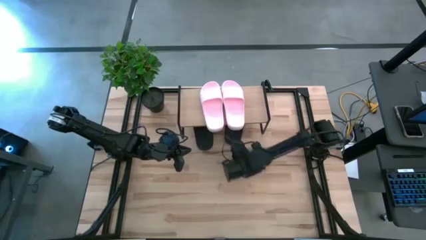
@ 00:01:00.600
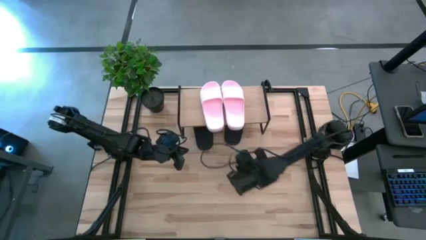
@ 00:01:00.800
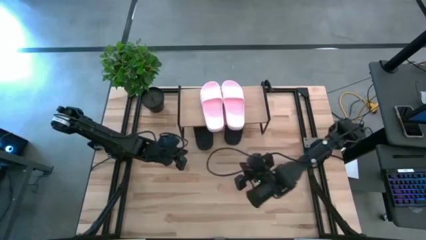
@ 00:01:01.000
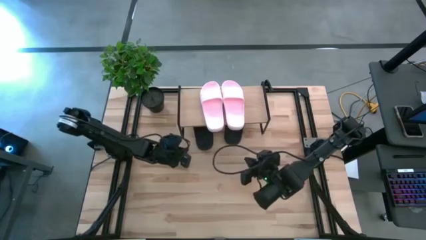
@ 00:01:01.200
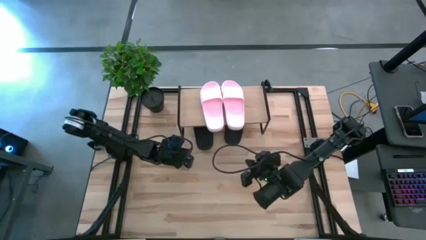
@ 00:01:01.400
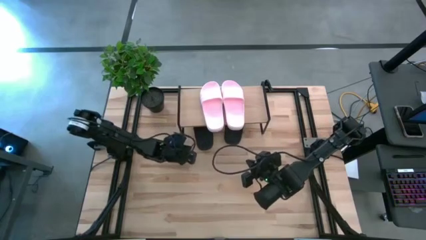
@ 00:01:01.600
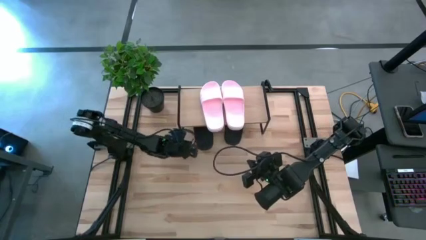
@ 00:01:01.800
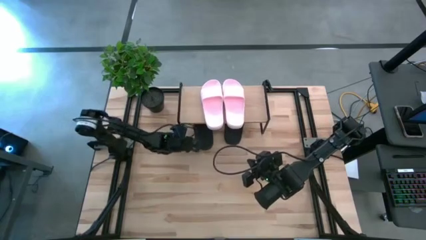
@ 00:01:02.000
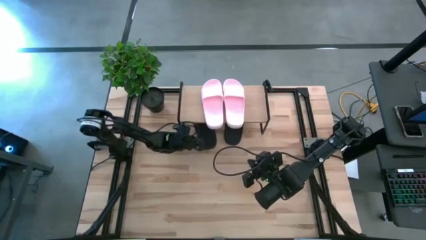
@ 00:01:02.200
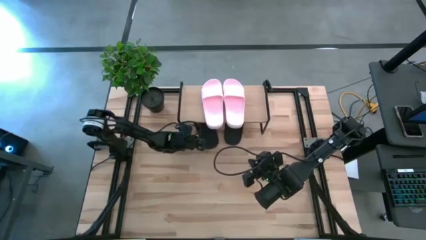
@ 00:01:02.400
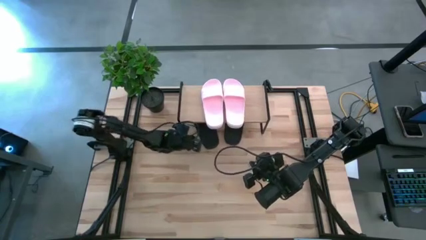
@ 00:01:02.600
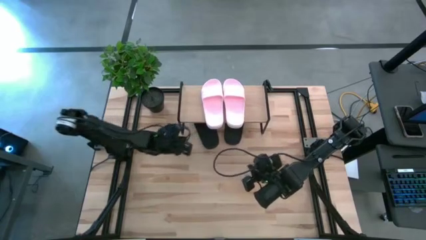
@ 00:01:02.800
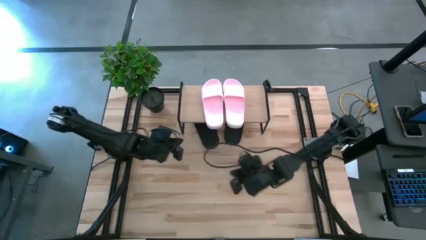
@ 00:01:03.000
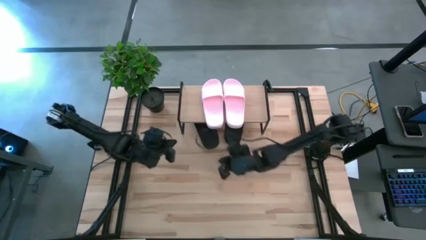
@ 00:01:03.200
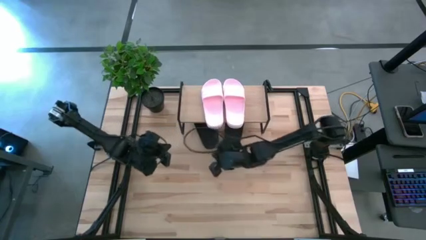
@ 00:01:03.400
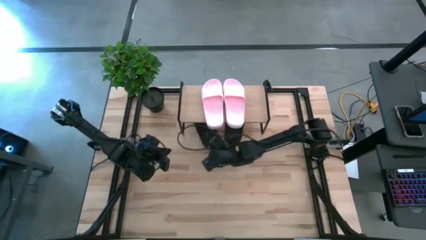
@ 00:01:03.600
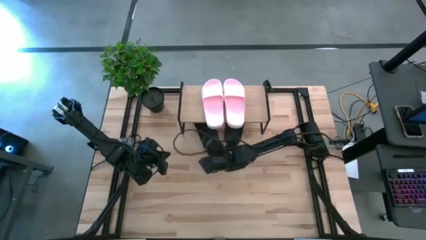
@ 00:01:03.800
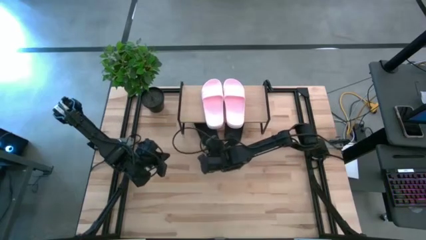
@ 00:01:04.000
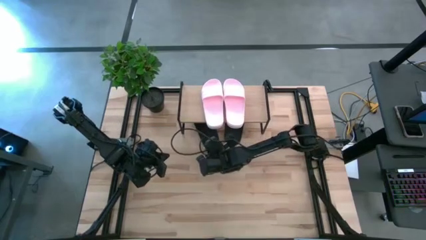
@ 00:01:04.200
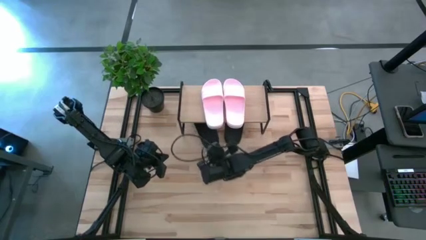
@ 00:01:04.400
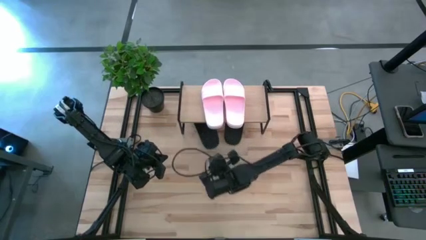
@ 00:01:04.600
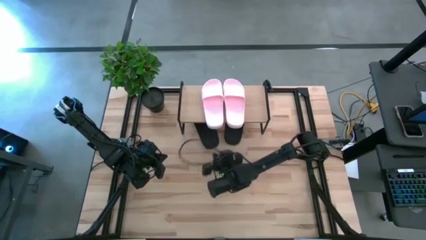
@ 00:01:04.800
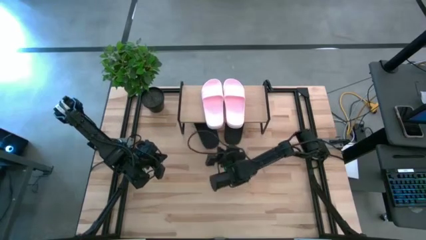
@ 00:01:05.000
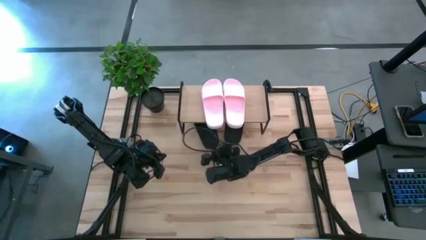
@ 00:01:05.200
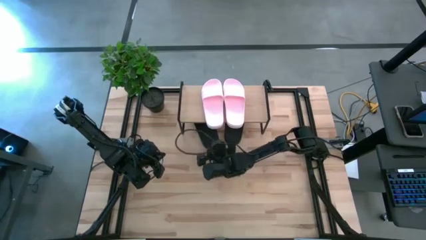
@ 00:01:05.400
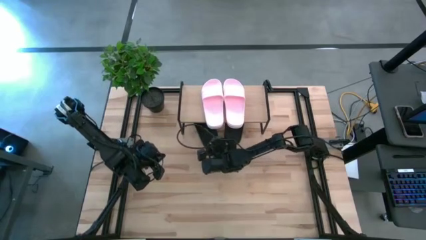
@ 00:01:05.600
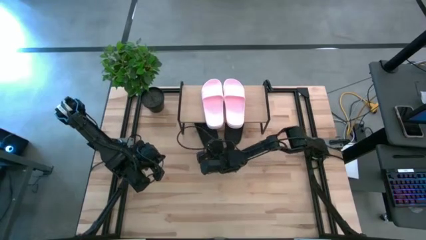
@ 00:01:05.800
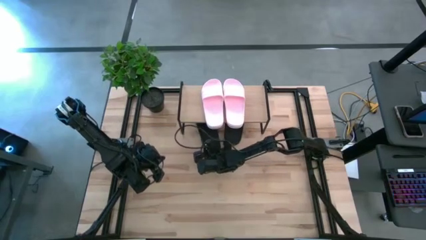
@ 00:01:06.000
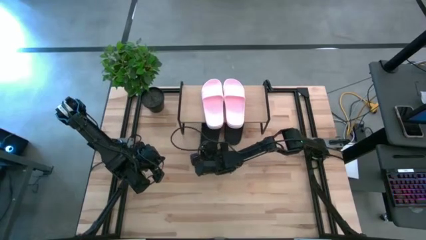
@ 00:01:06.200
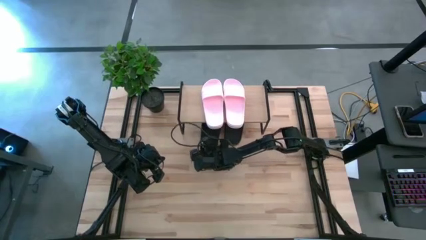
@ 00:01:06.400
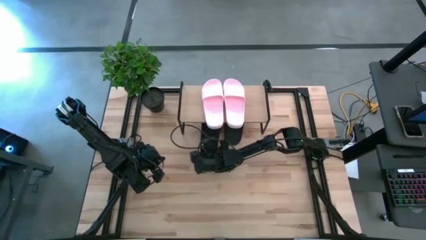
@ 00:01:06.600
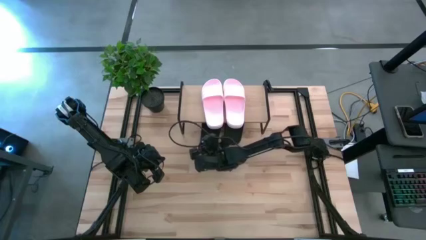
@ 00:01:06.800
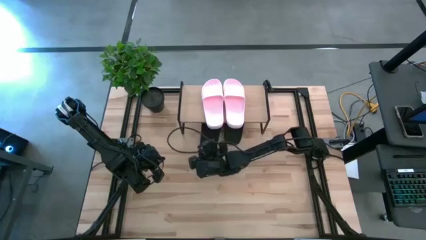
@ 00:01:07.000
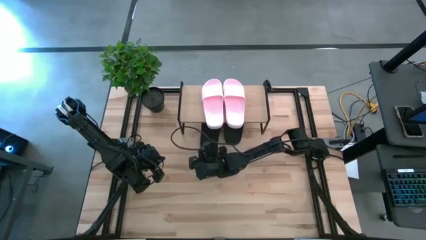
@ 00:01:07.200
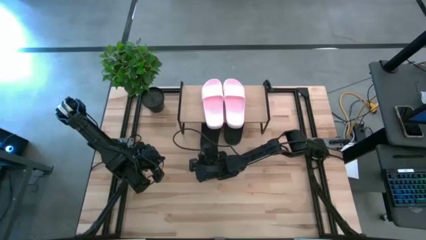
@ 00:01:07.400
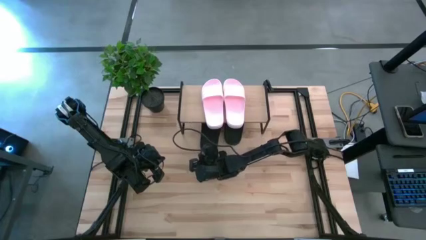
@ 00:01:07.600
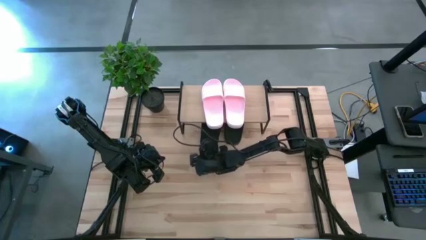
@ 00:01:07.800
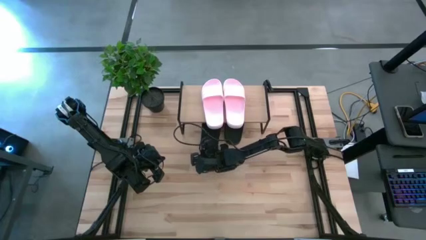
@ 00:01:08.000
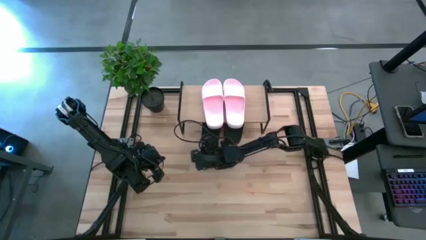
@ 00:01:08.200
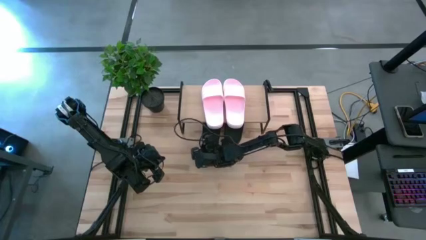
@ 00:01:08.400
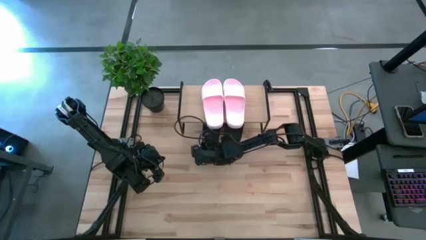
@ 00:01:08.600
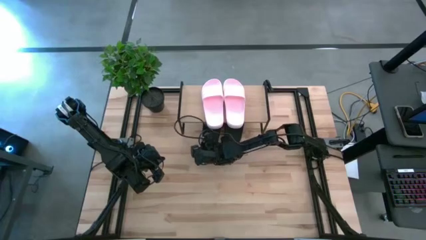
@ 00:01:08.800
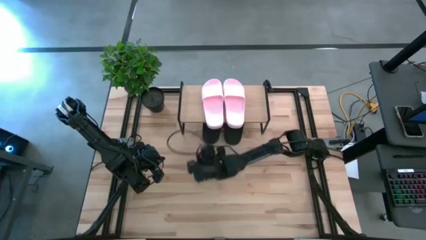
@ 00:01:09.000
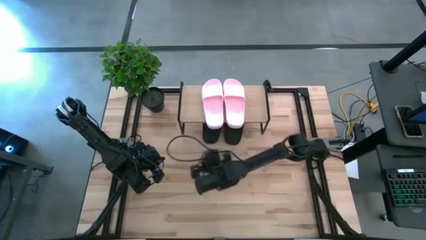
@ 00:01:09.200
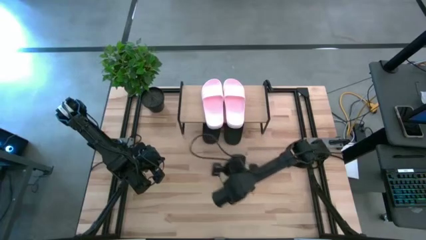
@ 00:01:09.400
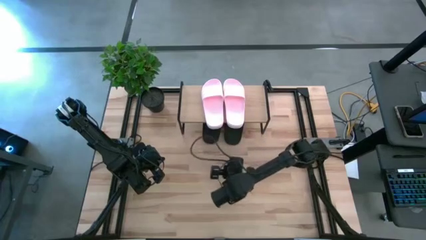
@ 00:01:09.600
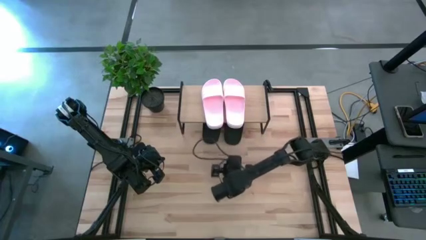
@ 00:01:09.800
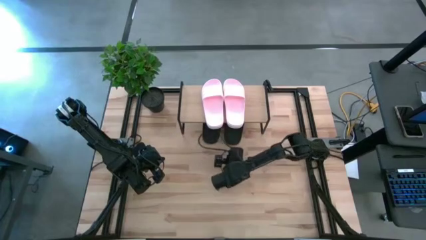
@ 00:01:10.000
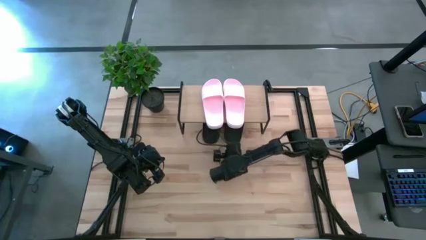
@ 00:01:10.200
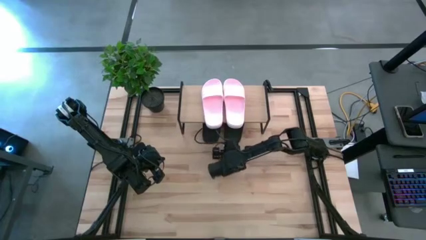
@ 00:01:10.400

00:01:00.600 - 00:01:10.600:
Task: Pick and place slides into the shelf
Adjust the black slippers

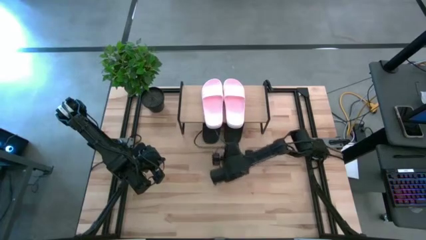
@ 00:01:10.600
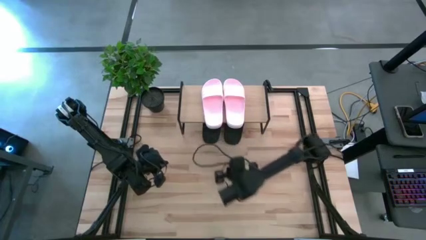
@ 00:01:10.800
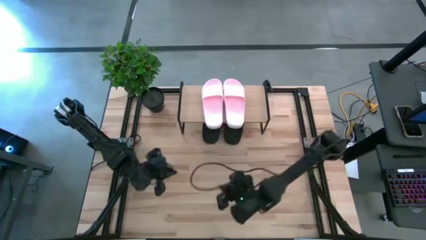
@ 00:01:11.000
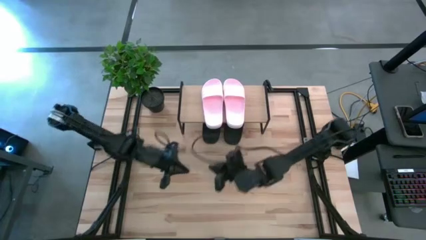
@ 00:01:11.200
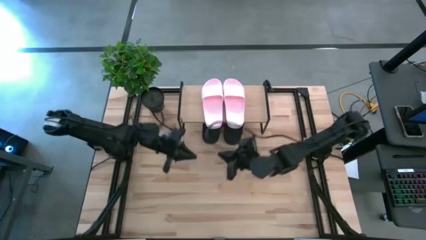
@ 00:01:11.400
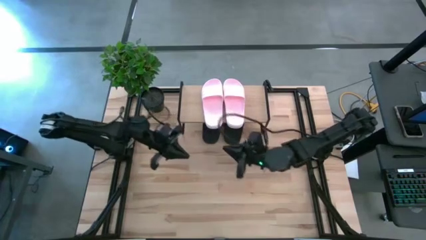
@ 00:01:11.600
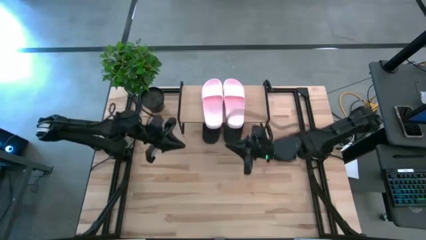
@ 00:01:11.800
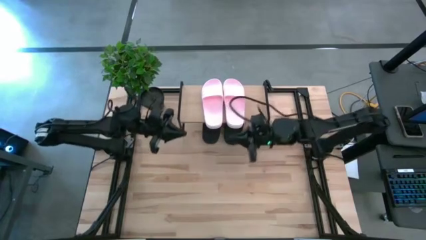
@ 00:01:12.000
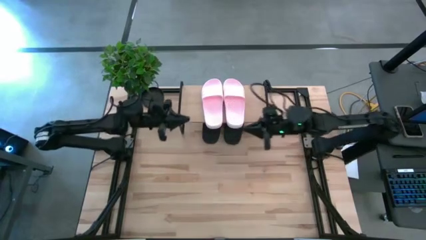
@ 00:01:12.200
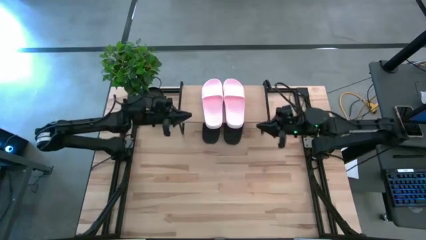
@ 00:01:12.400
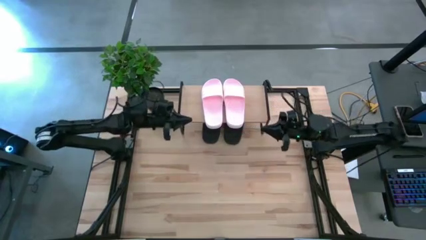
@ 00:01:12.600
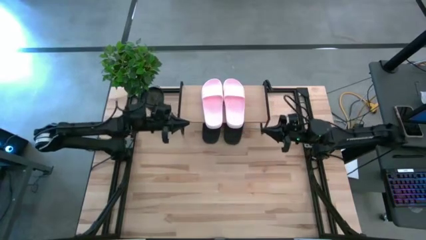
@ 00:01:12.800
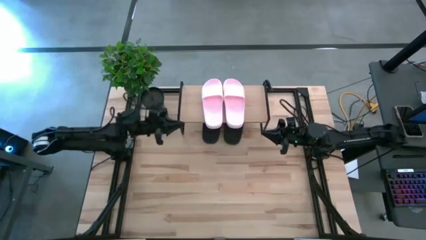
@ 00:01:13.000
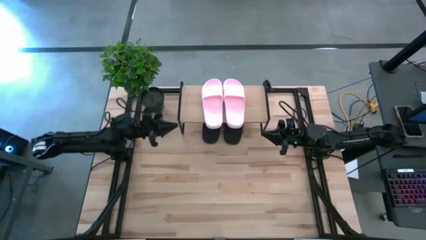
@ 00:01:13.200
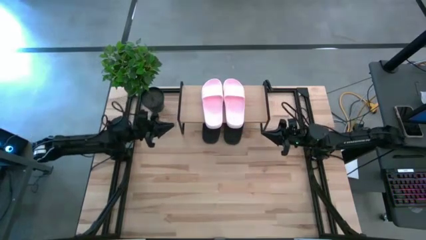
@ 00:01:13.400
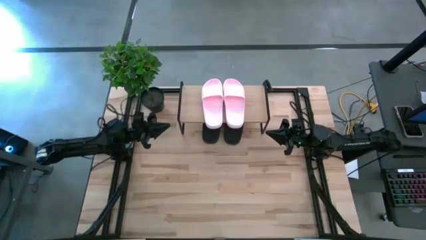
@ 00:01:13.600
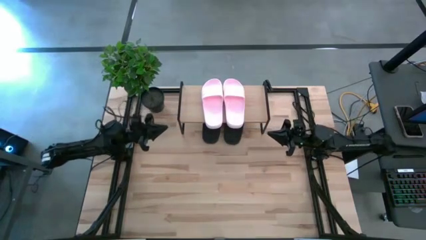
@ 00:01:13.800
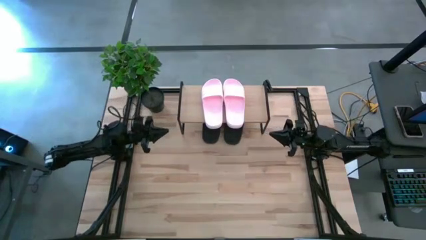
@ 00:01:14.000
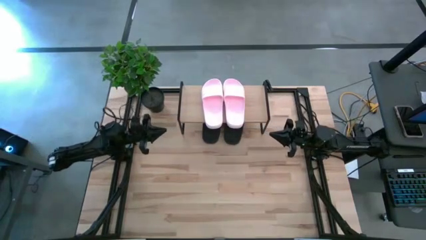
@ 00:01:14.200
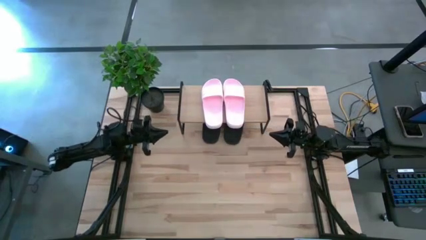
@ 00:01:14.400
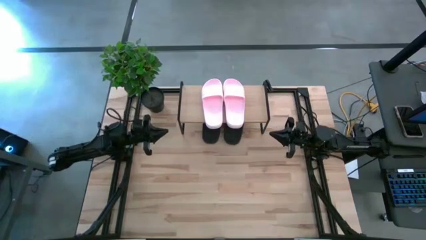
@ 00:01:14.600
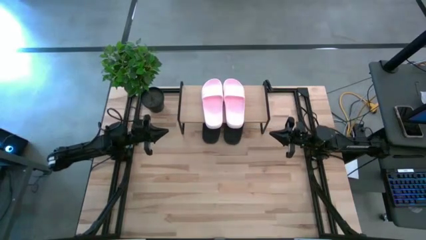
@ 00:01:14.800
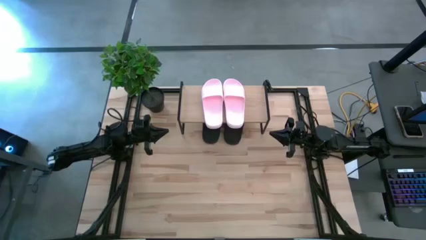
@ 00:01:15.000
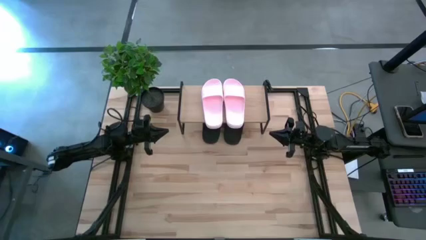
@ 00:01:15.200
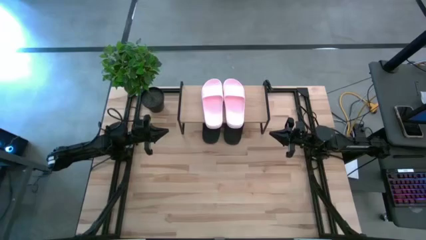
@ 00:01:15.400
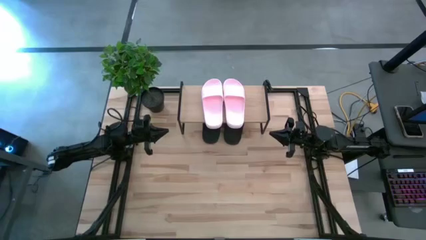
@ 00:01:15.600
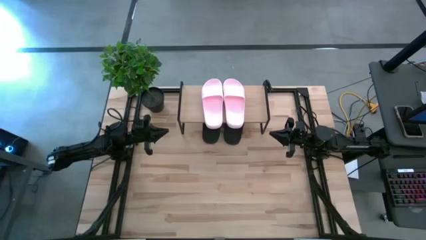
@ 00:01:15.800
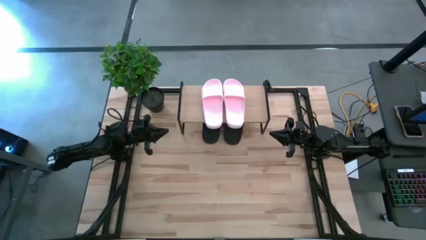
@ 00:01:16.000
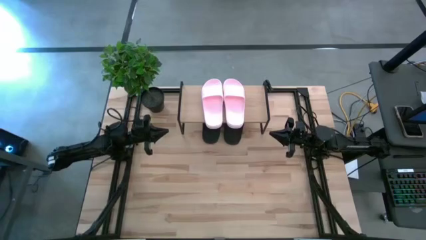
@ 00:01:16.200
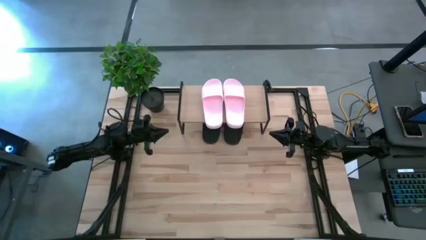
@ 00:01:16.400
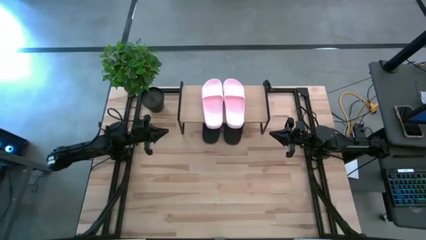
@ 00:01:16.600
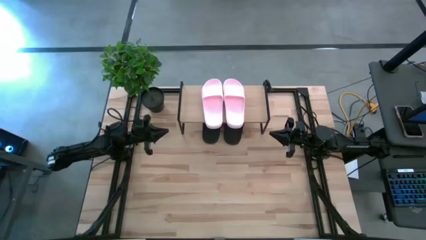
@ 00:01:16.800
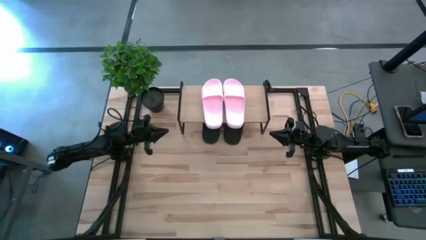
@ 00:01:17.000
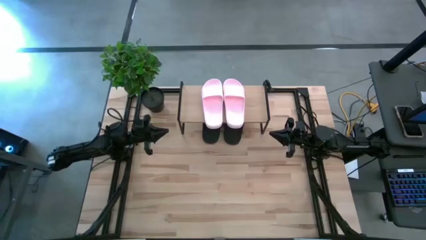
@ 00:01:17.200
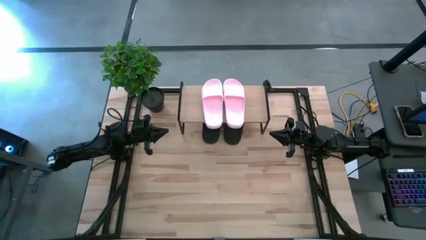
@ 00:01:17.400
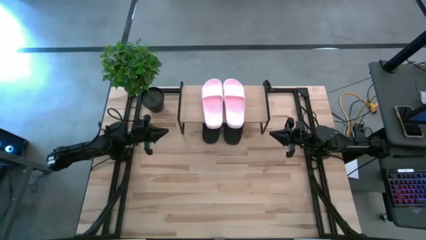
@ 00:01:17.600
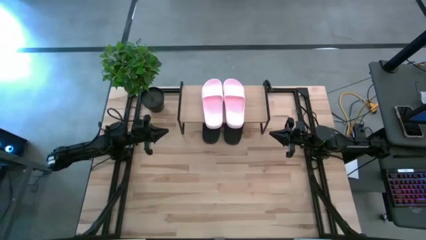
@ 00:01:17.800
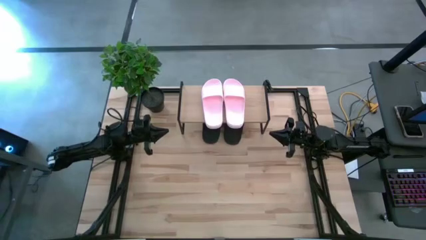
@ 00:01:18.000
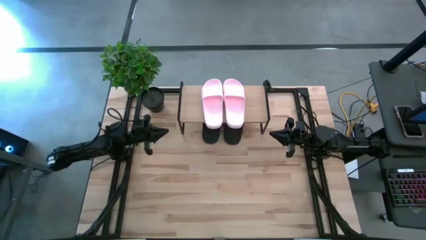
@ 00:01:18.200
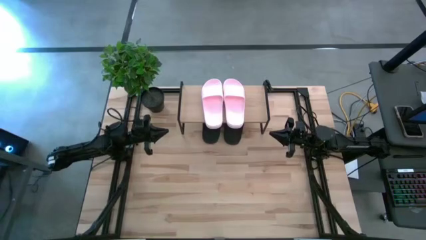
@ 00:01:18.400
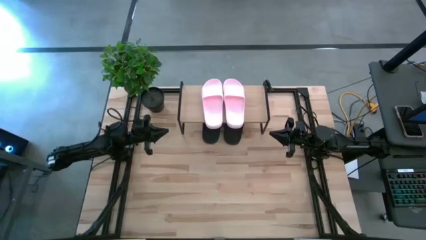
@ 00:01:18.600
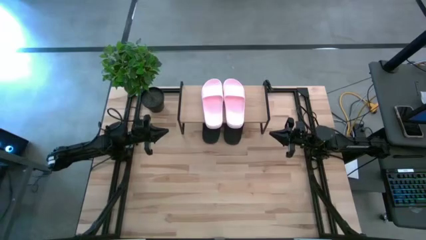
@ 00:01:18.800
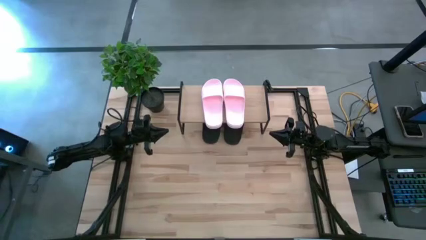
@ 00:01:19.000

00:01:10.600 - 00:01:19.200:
Return to Home Position
